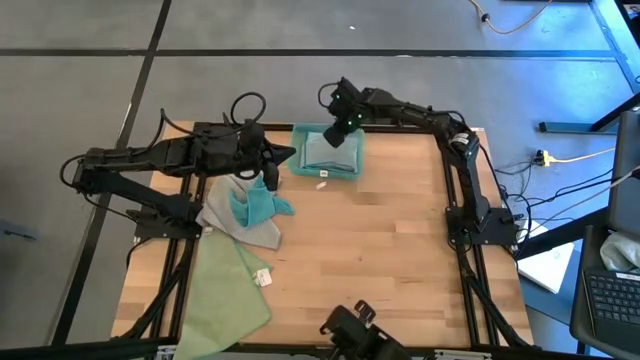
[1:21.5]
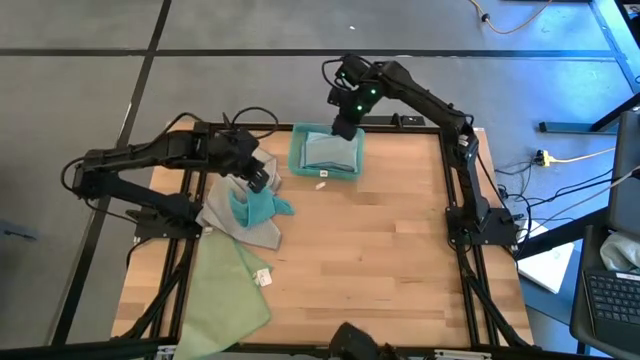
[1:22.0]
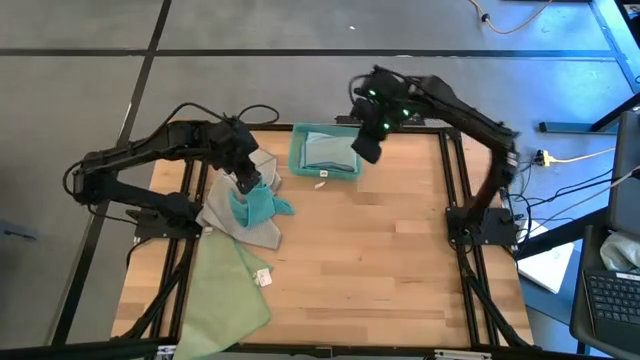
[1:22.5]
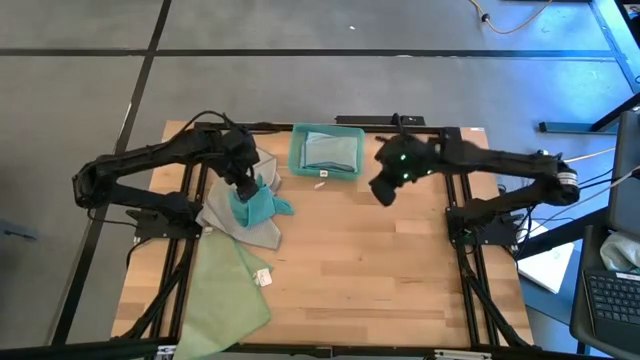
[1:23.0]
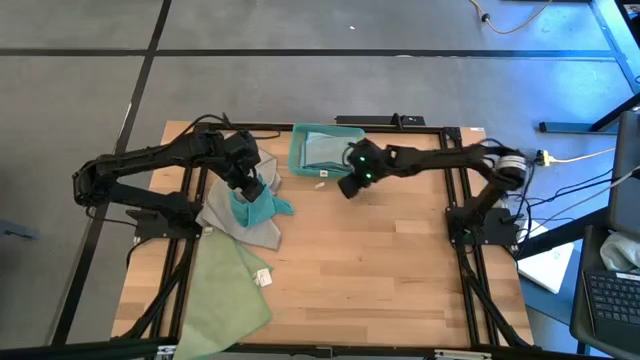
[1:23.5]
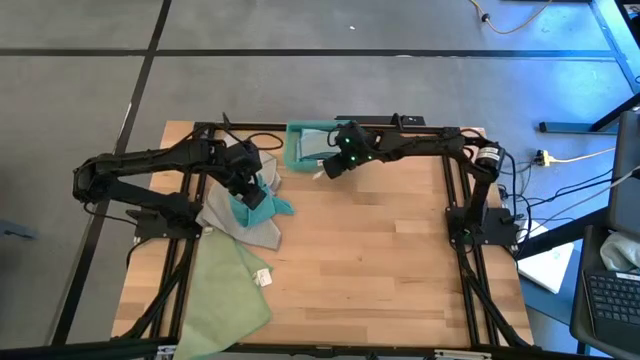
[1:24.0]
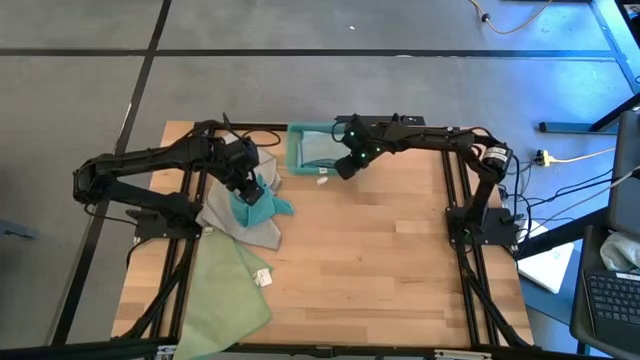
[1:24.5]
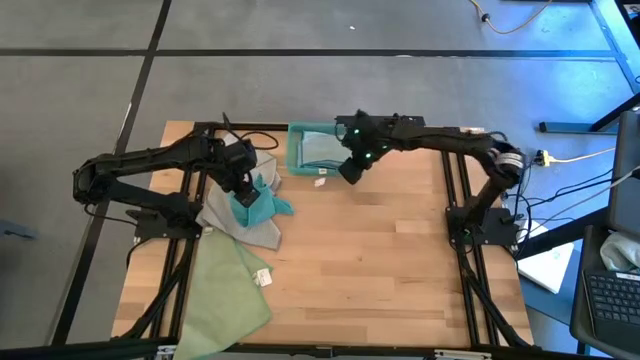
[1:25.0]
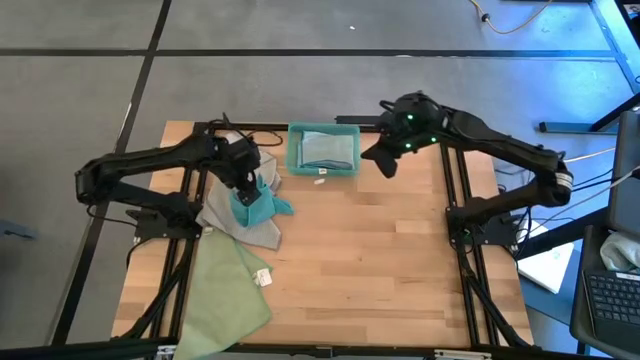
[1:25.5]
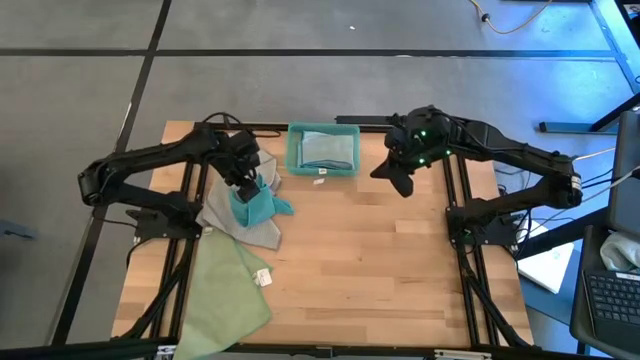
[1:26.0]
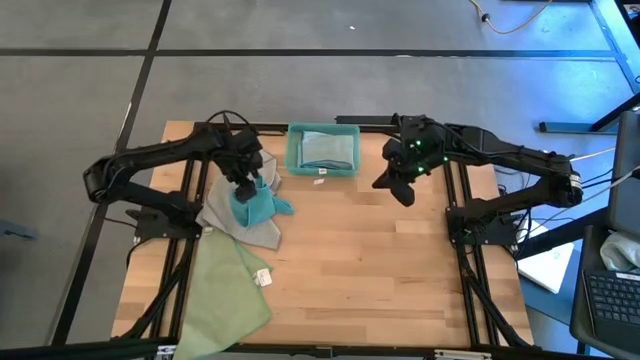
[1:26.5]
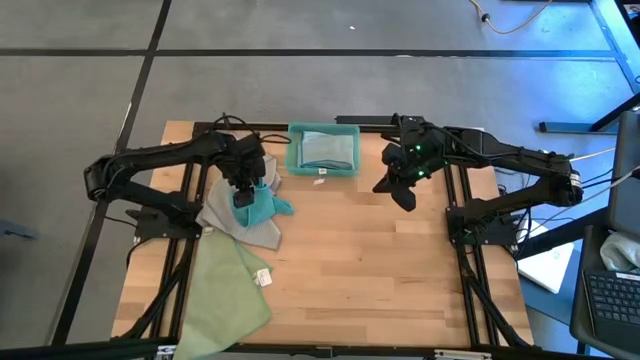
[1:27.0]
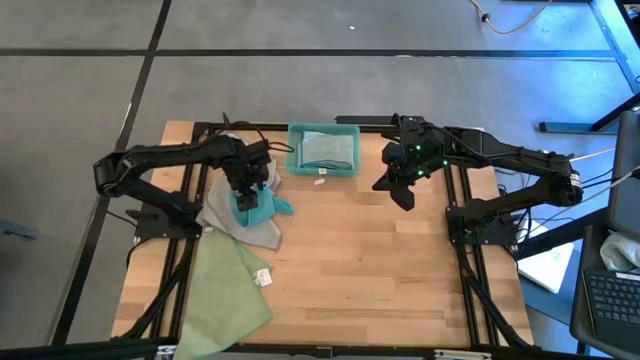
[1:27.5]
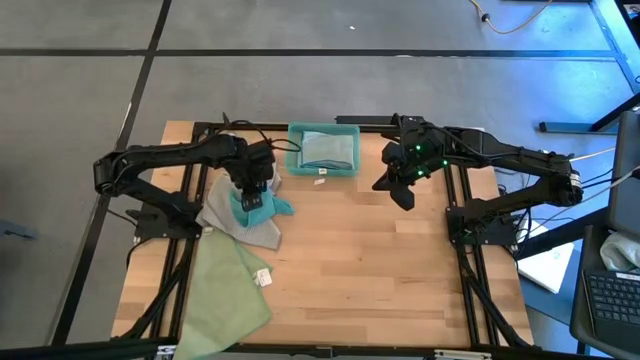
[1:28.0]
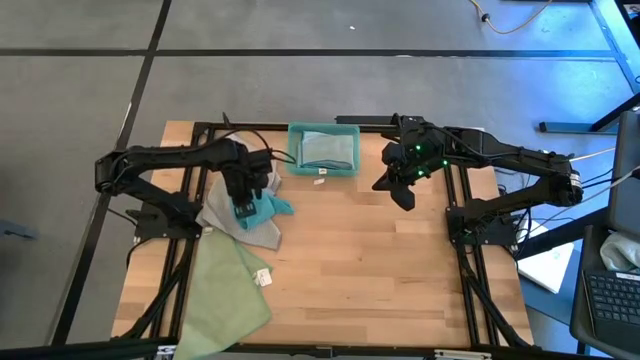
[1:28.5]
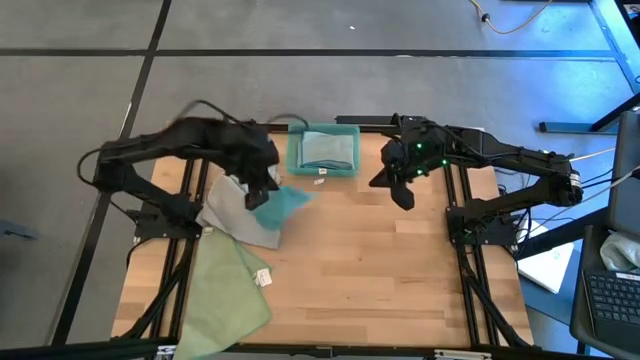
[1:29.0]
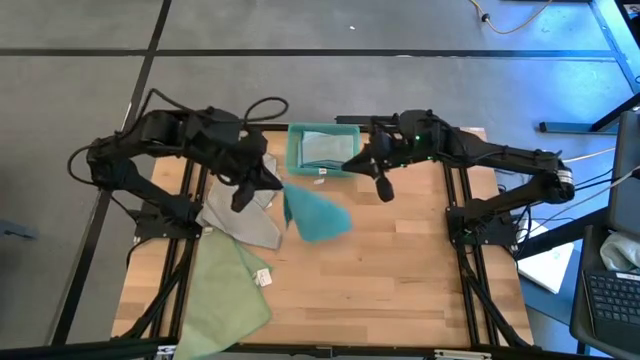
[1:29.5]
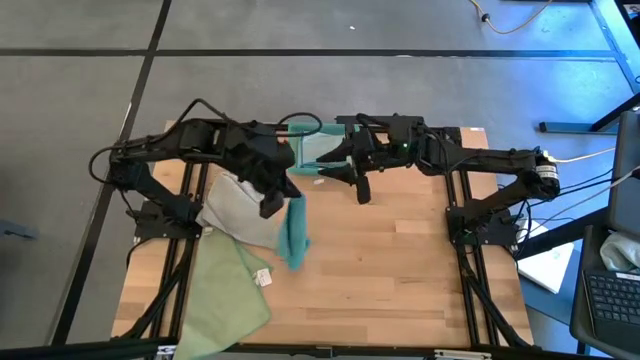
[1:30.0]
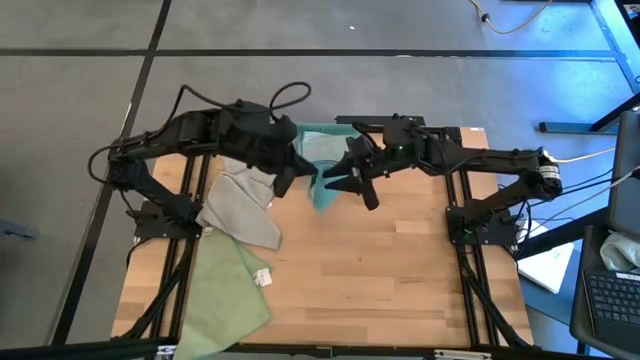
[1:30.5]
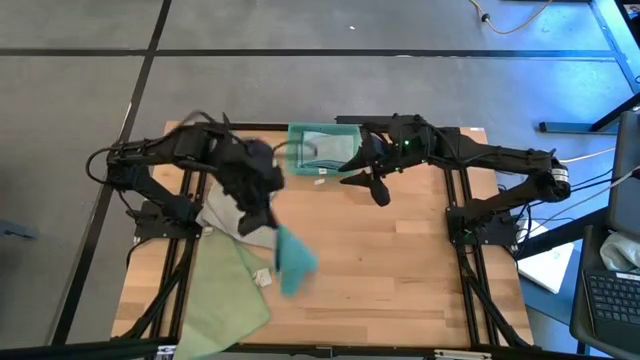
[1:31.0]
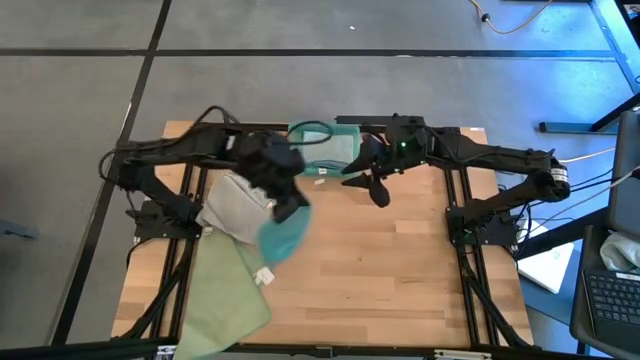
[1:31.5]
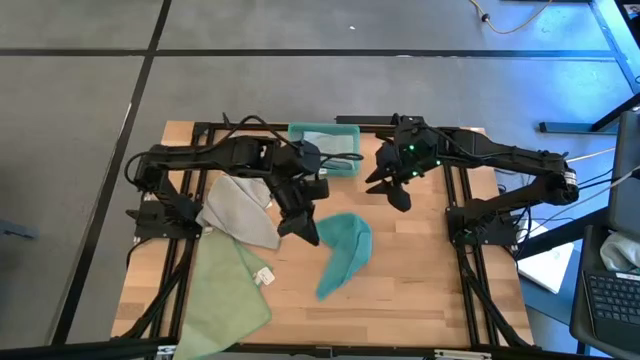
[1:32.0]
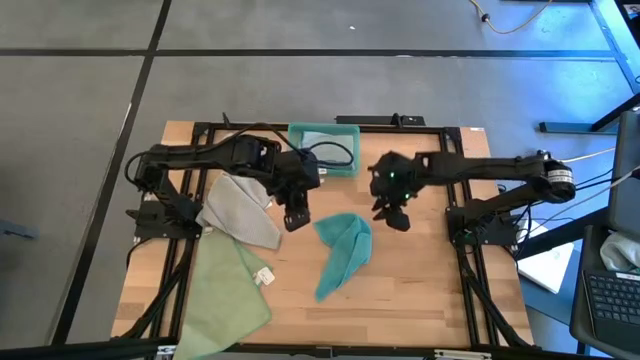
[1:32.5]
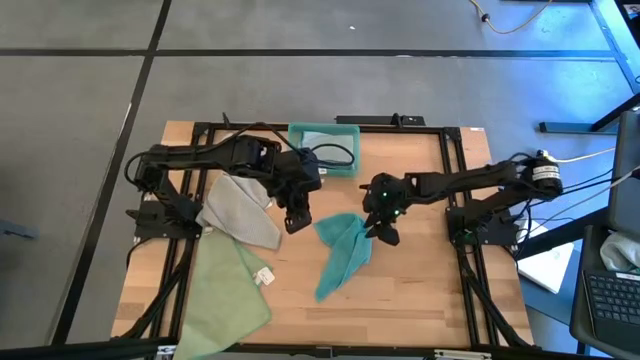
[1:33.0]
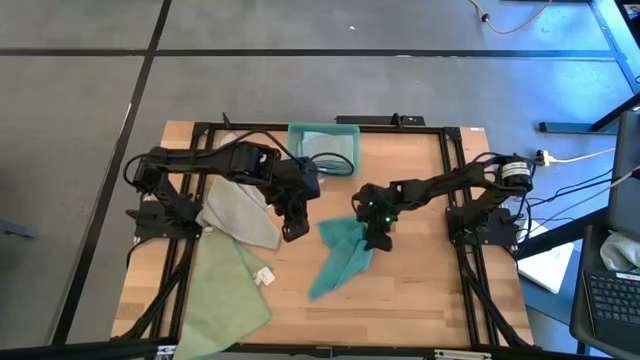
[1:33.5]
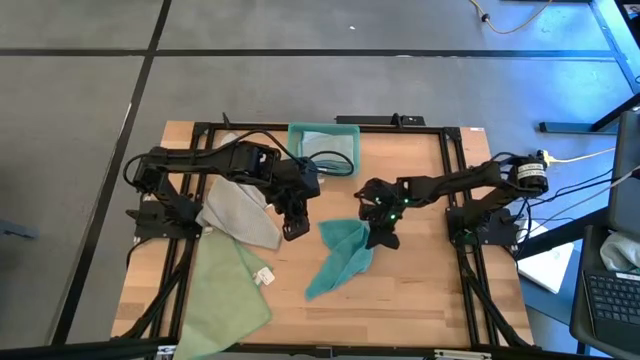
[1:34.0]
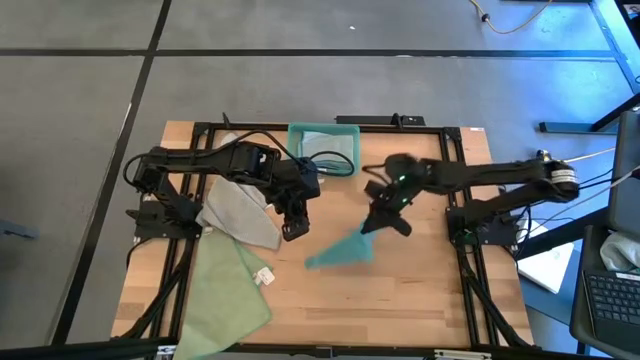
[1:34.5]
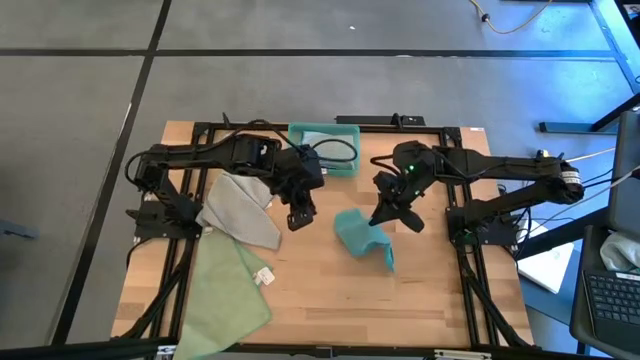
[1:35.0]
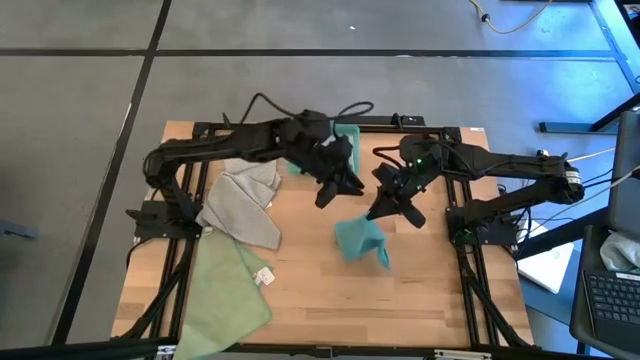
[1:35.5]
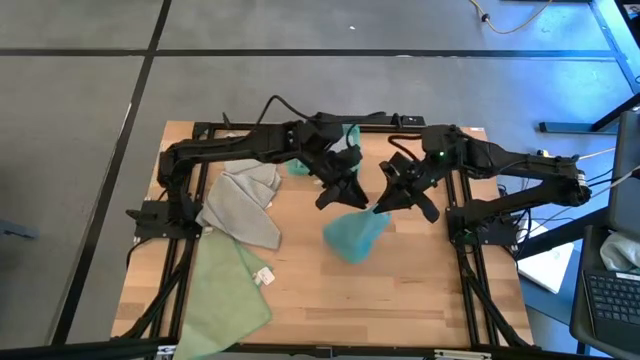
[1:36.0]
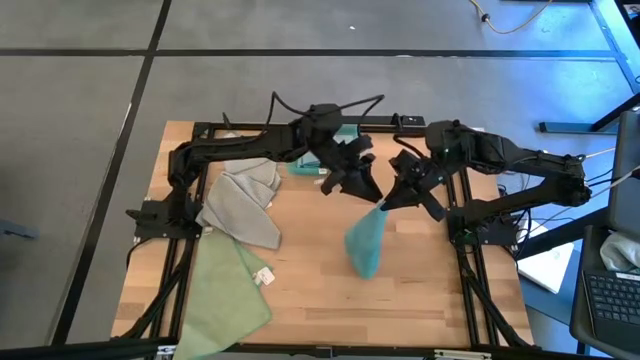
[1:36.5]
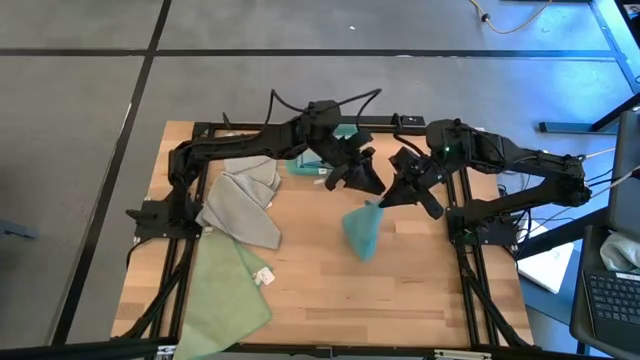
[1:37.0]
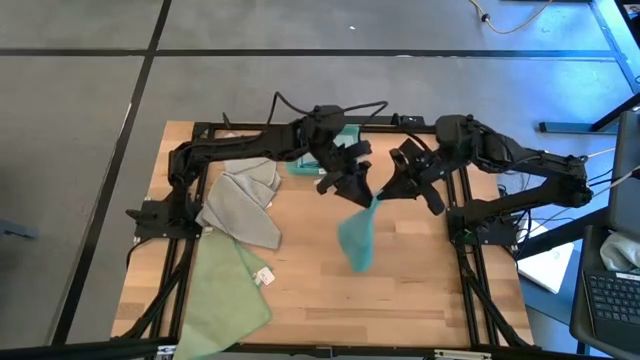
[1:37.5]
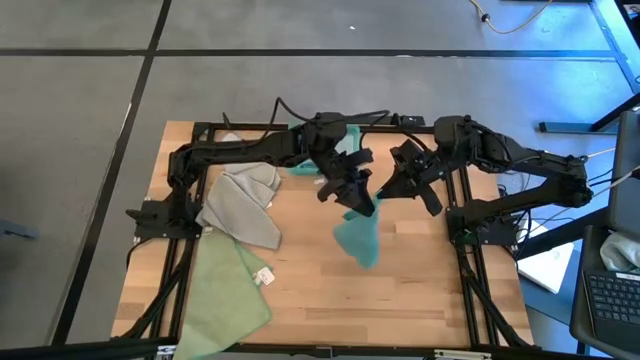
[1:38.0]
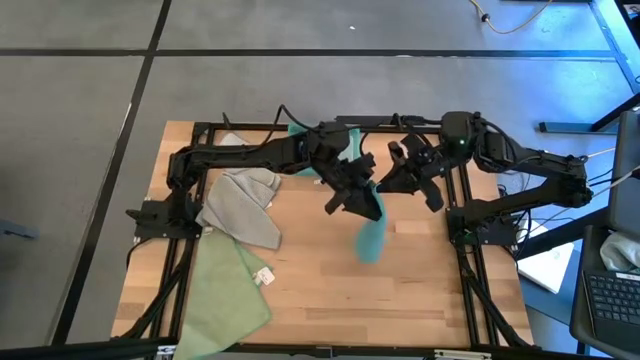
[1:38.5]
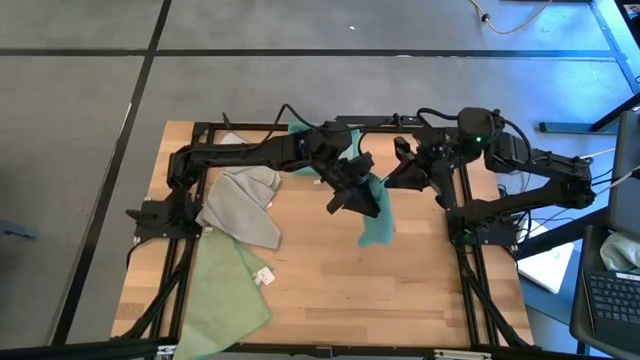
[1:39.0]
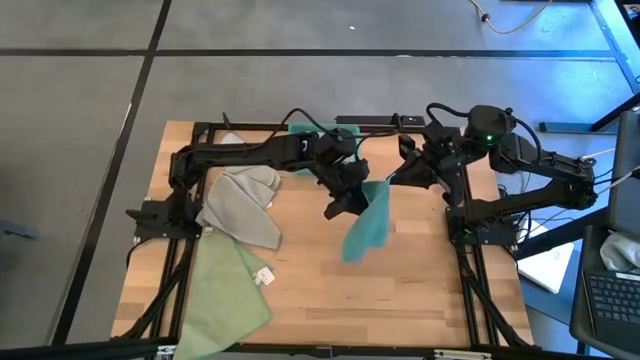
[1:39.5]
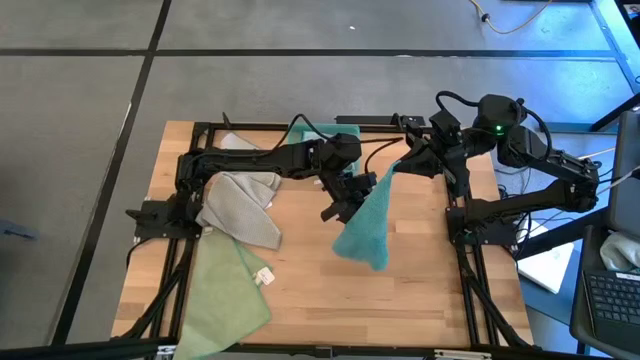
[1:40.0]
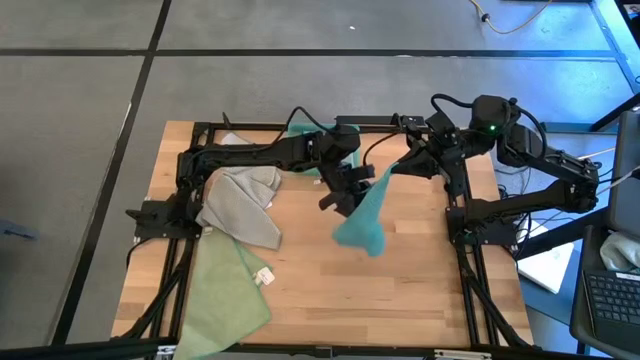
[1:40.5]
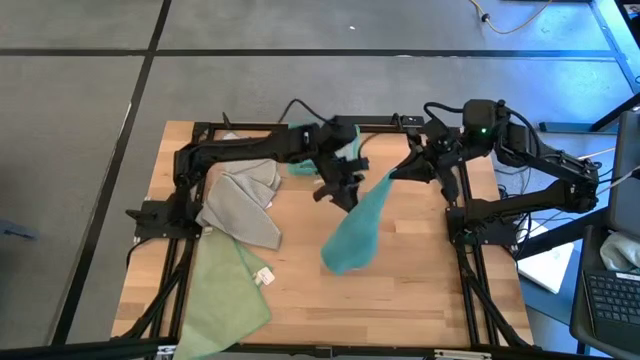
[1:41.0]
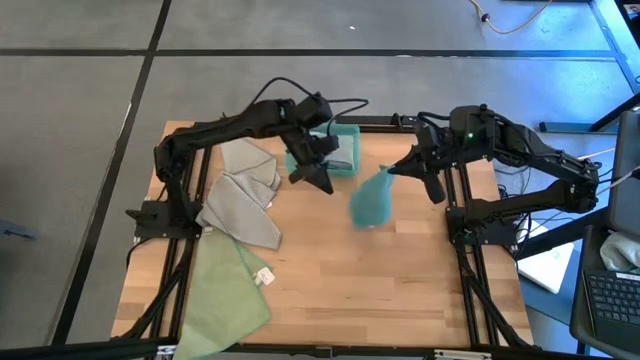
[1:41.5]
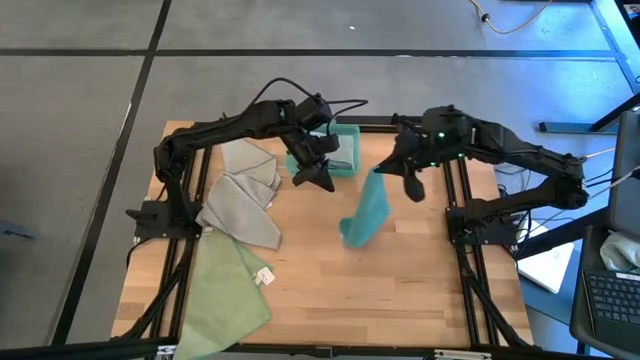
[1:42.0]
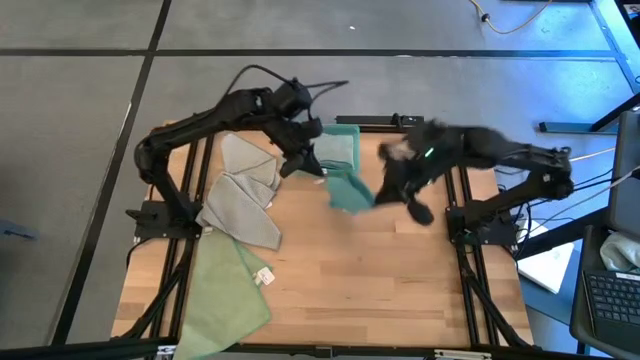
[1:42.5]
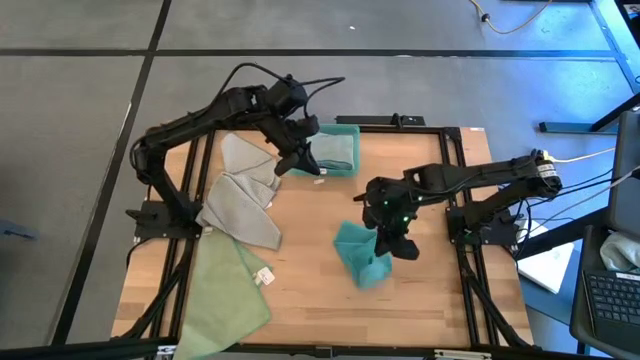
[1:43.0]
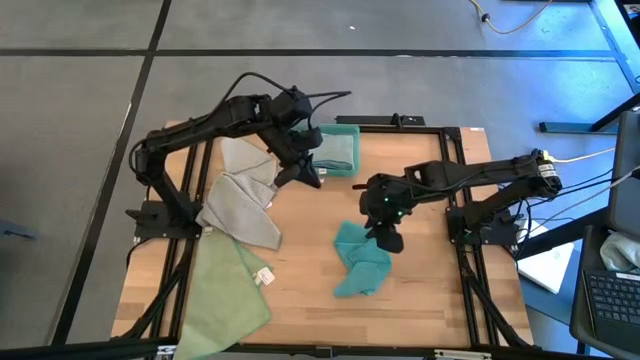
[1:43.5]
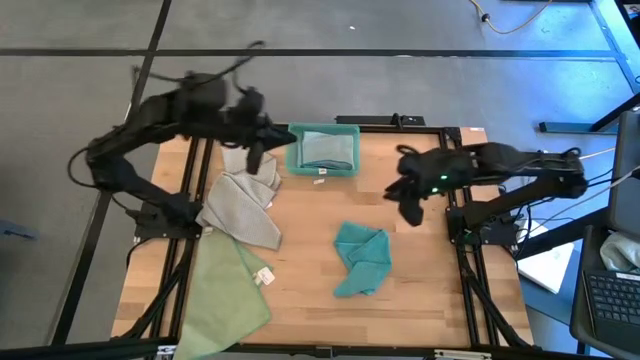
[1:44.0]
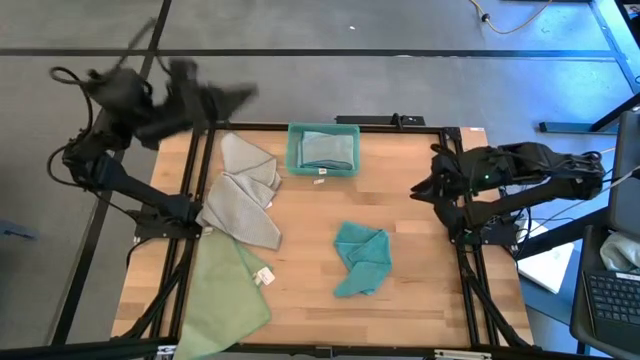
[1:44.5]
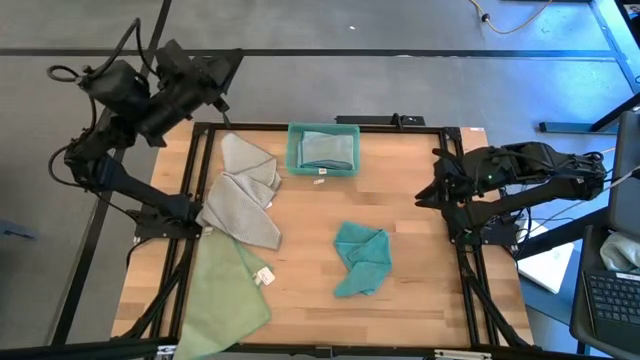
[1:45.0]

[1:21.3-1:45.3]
Task: Fold microfiber towels
Prepare the blue towel
